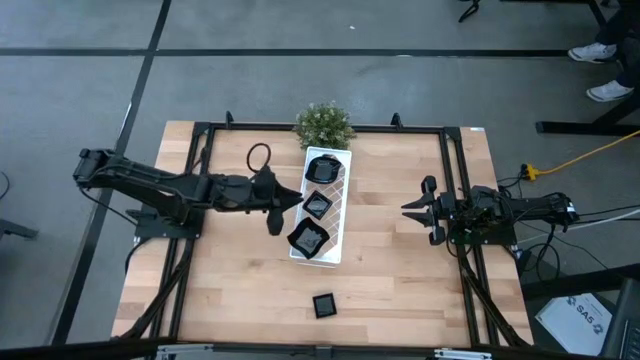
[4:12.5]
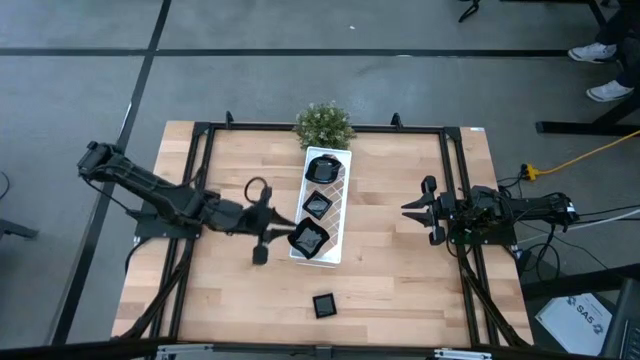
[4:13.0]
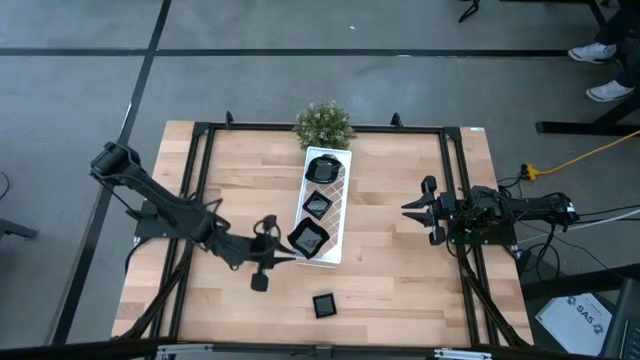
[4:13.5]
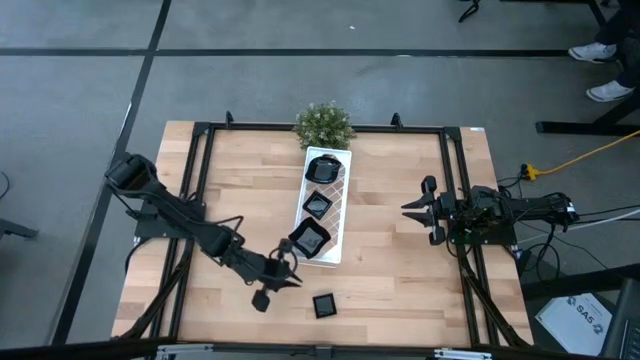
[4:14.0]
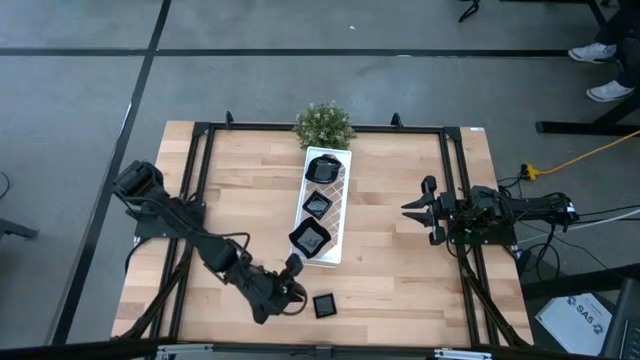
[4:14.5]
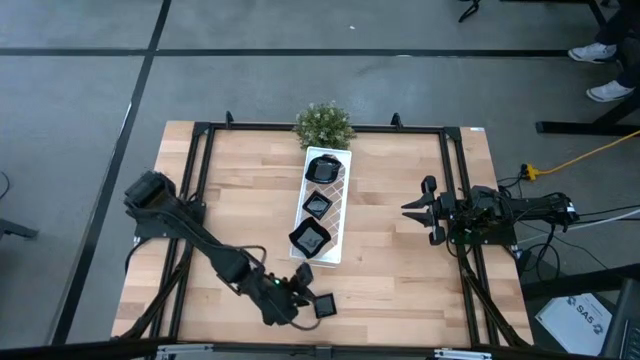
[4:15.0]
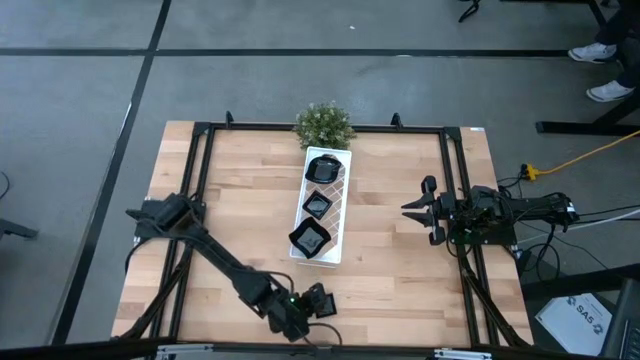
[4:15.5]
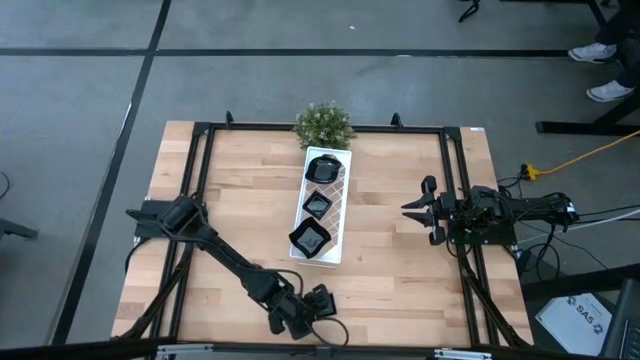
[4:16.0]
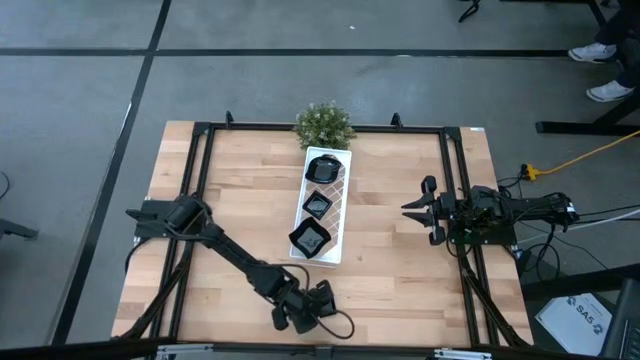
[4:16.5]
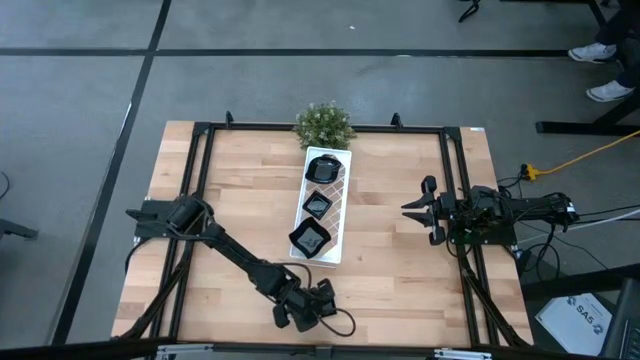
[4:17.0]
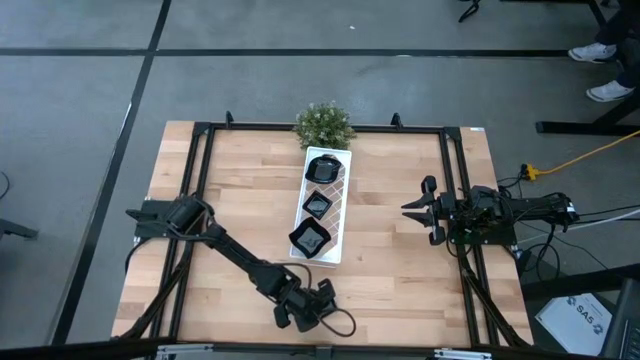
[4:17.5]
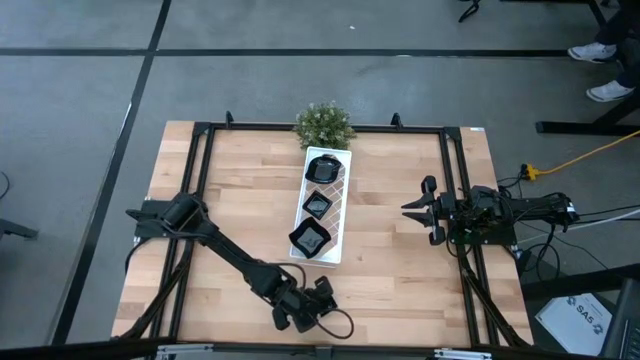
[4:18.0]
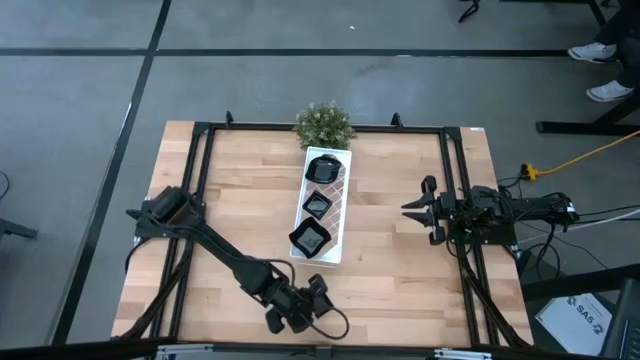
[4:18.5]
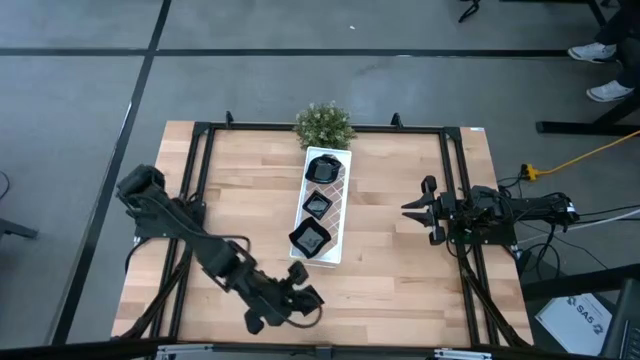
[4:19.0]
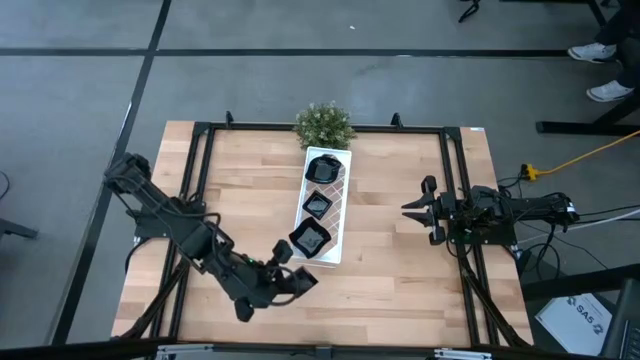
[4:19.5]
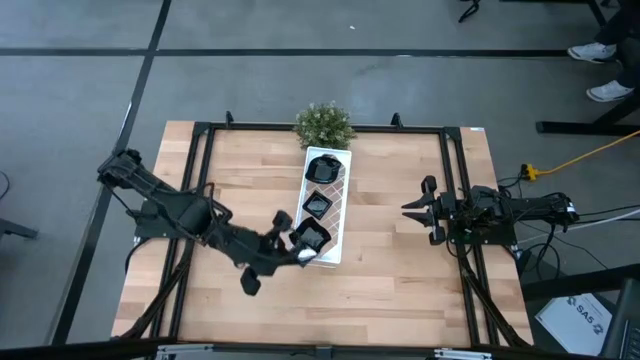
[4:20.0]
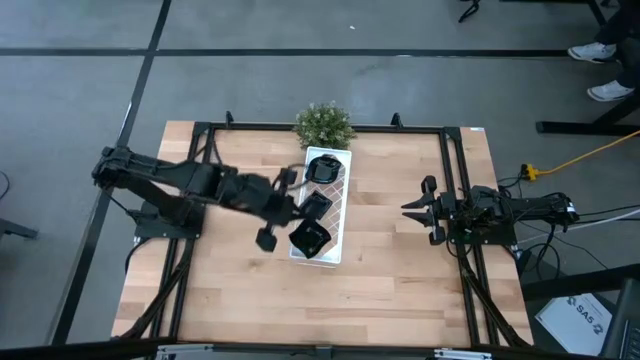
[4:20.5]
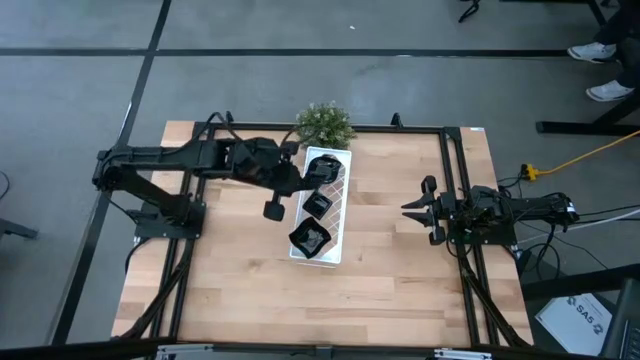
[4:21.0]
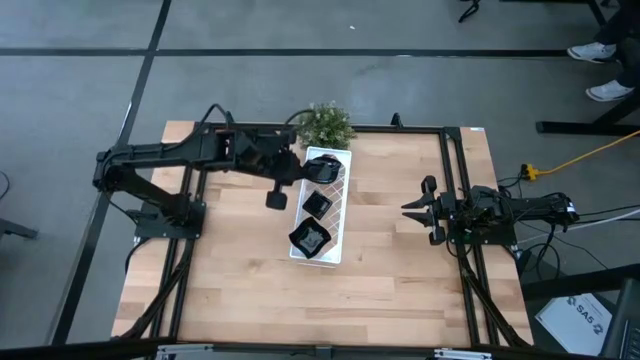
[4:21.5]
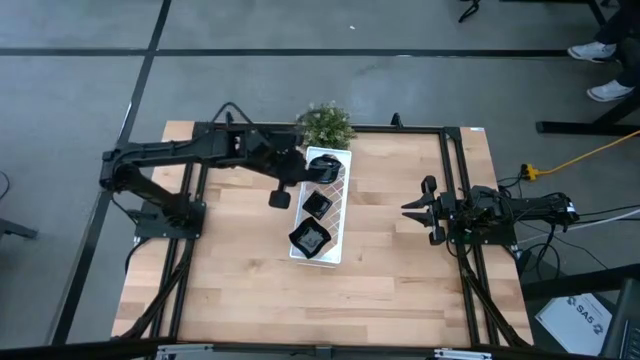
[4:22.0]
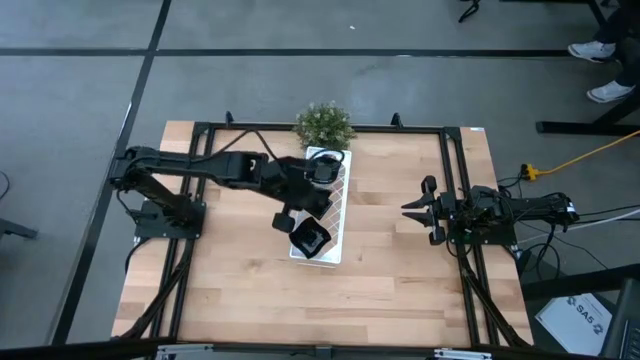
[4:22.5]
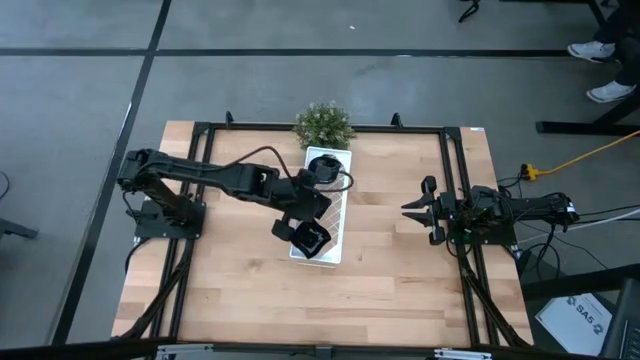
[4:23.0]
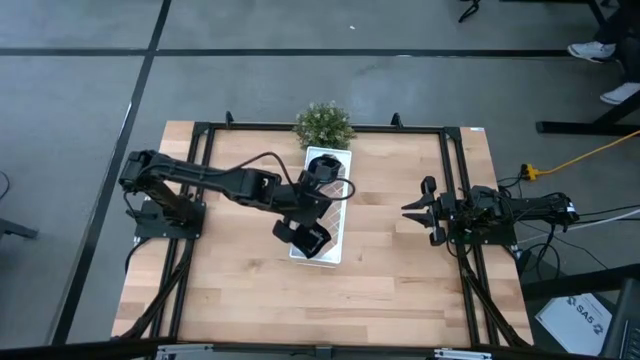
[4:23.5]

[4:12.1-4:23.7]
Task: Pick & Place Mini shaped plates
Stack the square plate on top of the square plate on the shelf

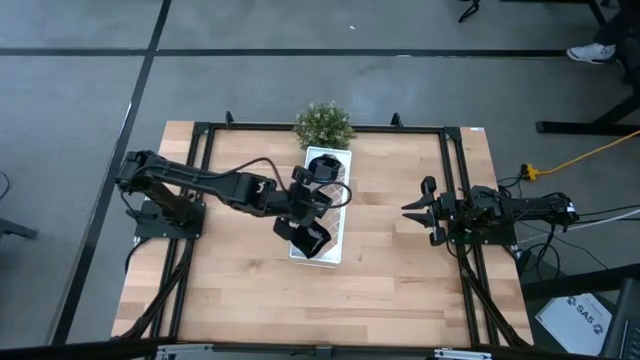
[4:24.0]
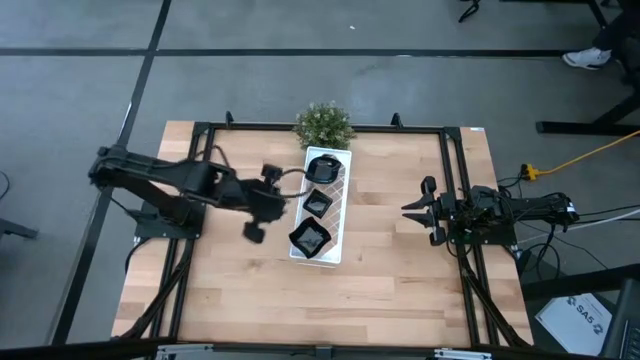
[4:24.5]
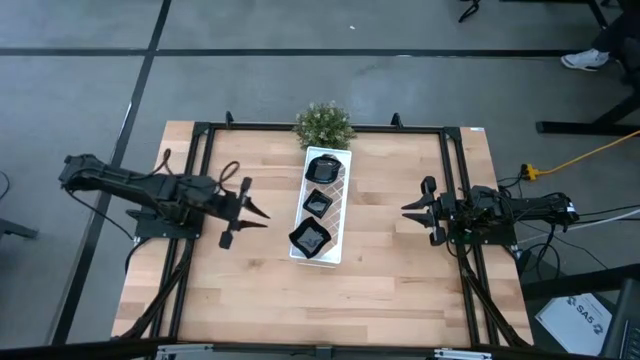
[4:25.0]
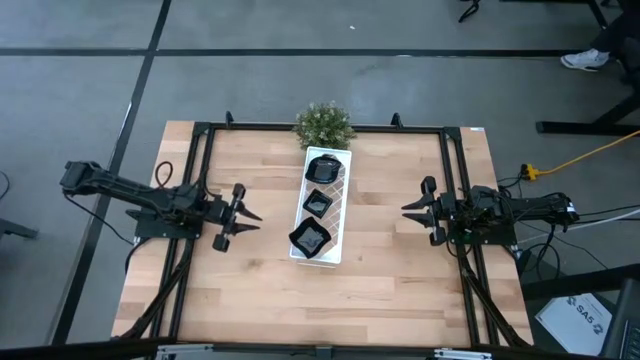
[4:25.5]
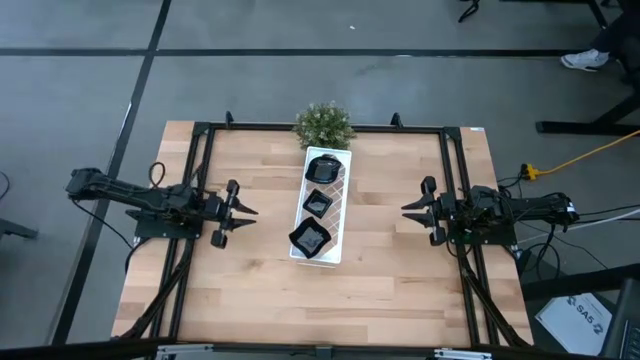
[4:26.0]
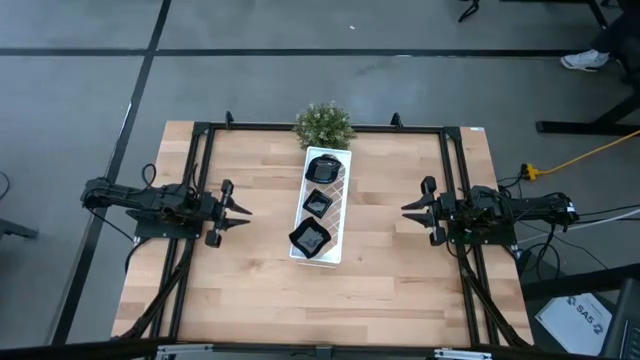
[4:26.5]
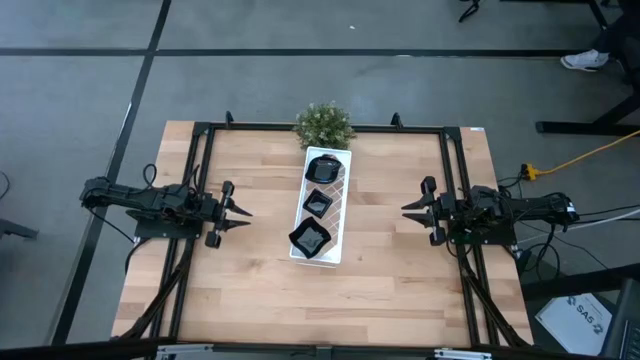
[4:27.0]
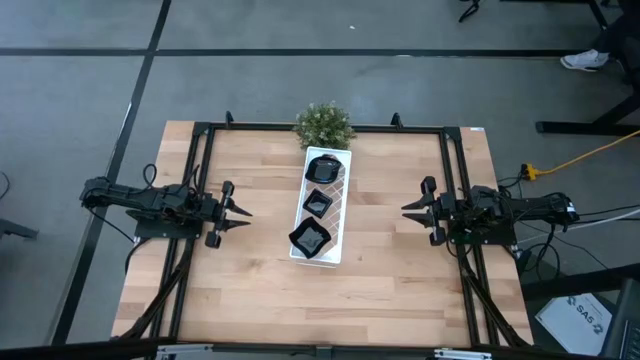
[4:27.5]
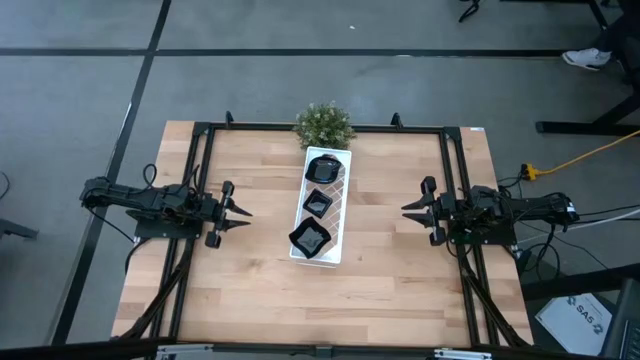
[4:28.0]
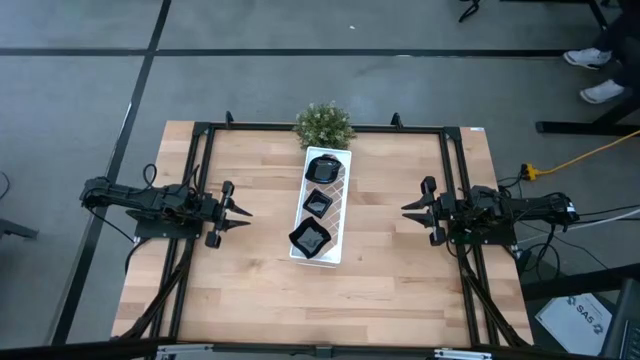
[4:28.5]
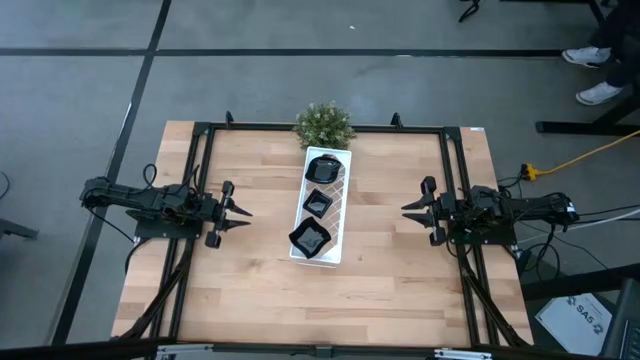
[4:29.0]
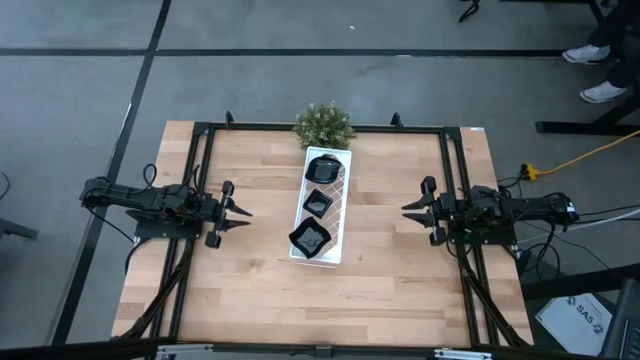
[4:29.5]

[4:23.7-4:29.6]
Return to Home Position

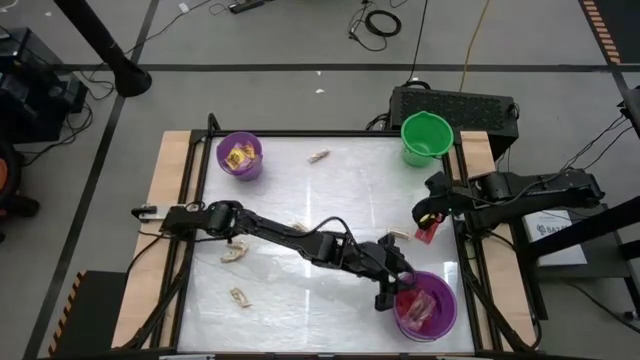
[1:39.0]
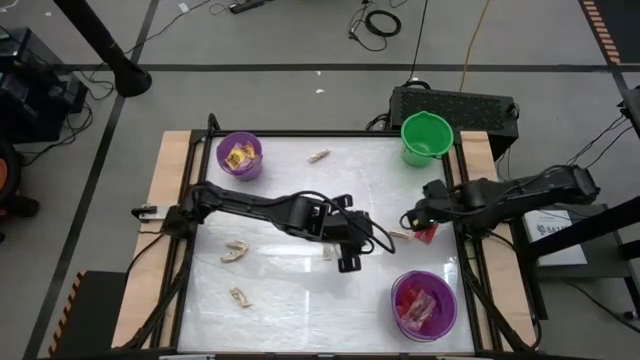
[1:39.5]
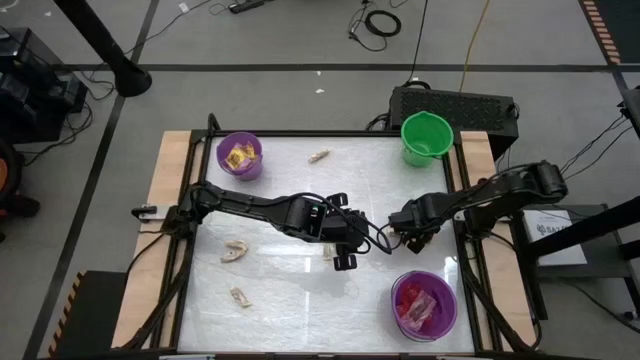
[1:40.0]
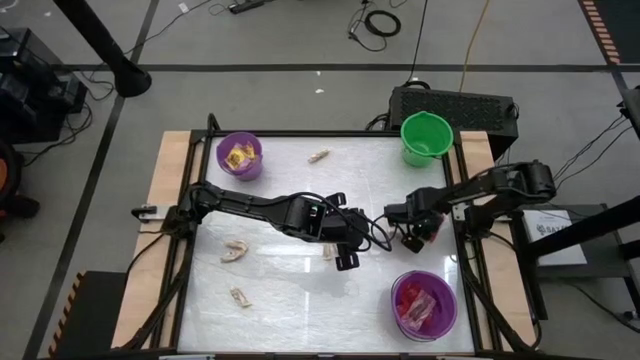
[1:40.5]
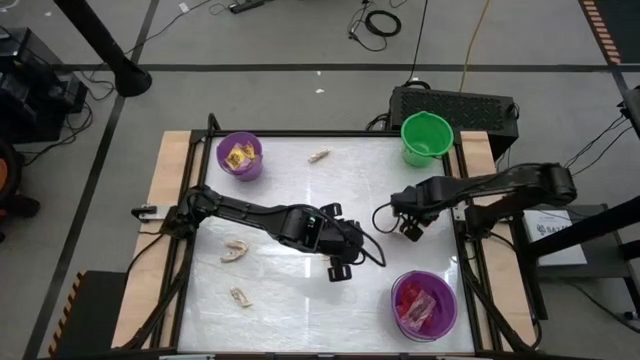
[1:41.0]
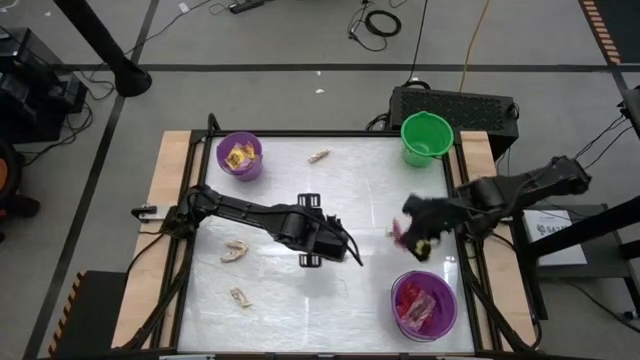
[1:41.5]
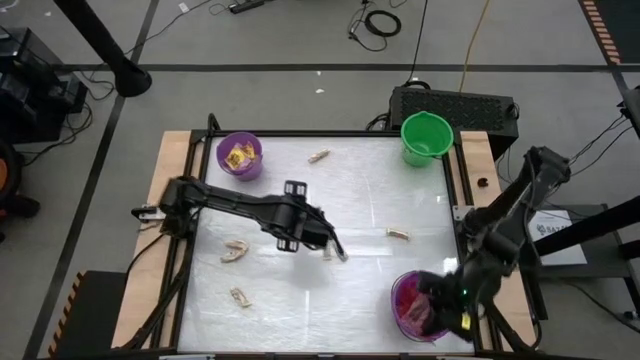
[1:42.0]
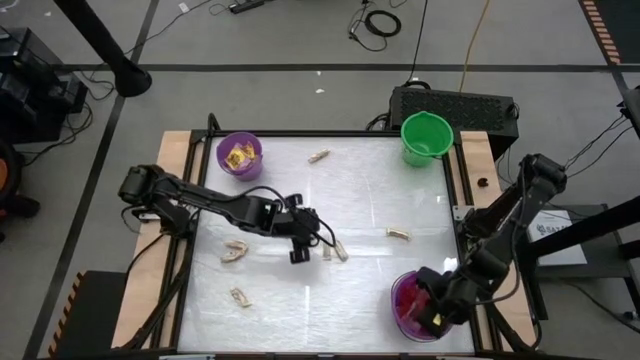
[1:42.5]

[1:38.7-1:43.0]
Task: Sort candy by brand, put in halloween buckets
Put the red candy into the bottom violet bucket
